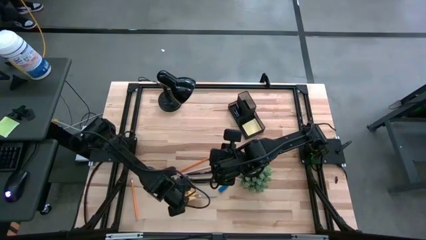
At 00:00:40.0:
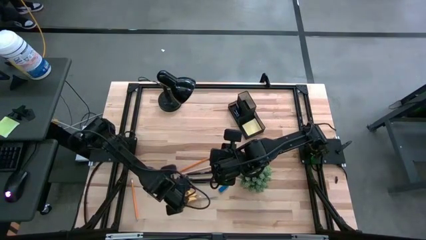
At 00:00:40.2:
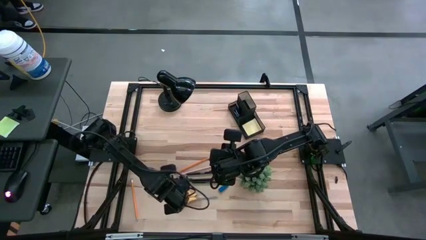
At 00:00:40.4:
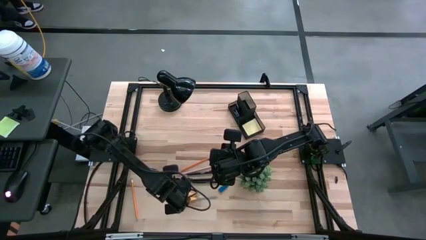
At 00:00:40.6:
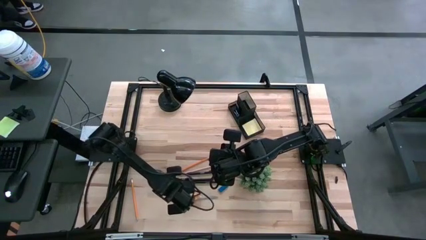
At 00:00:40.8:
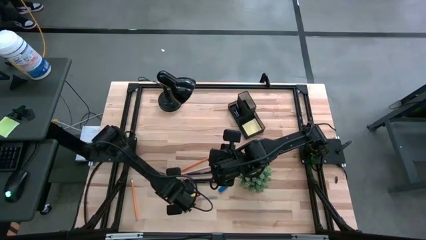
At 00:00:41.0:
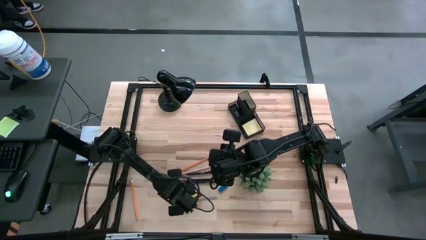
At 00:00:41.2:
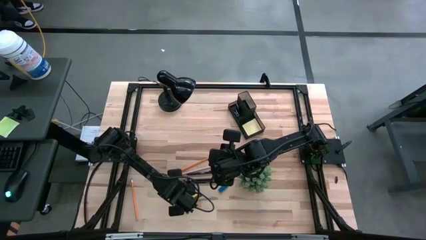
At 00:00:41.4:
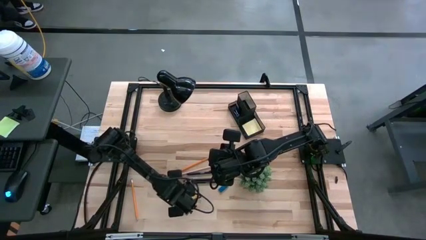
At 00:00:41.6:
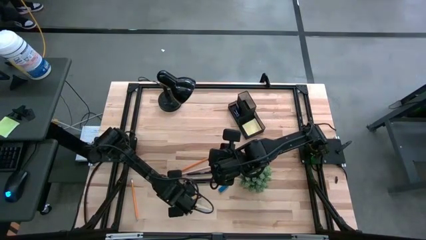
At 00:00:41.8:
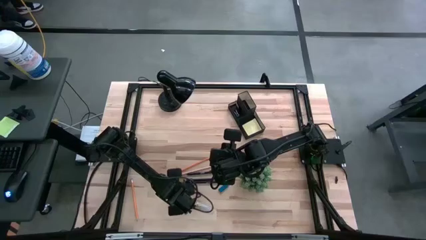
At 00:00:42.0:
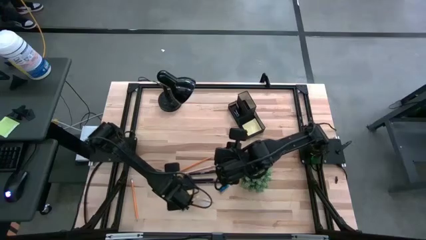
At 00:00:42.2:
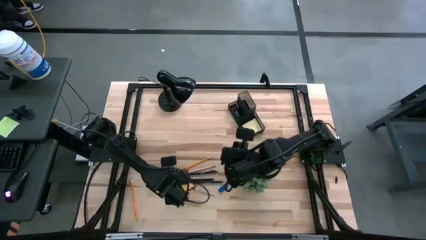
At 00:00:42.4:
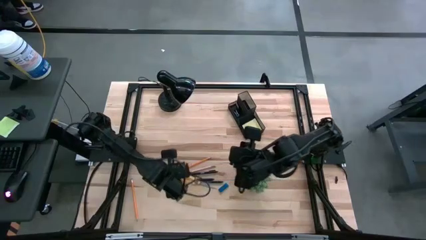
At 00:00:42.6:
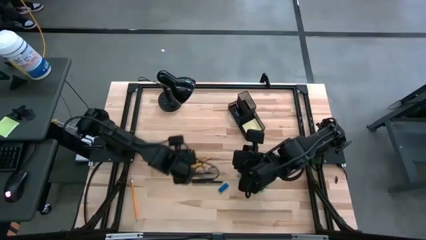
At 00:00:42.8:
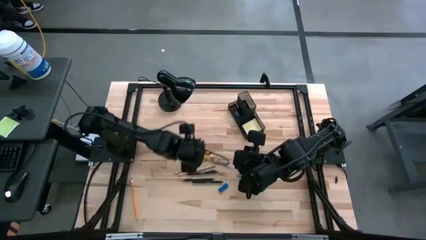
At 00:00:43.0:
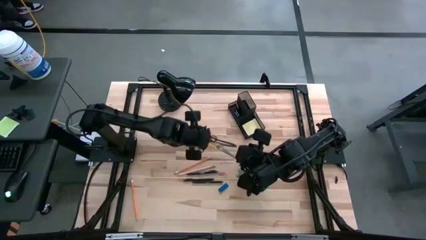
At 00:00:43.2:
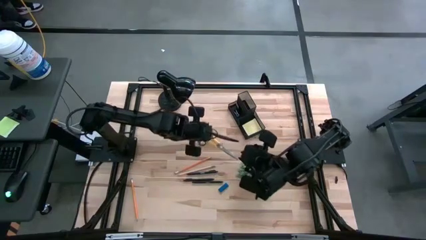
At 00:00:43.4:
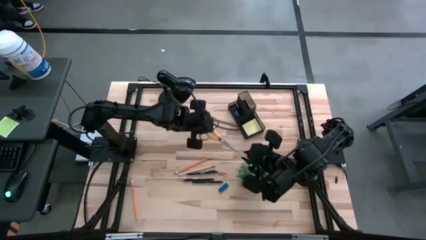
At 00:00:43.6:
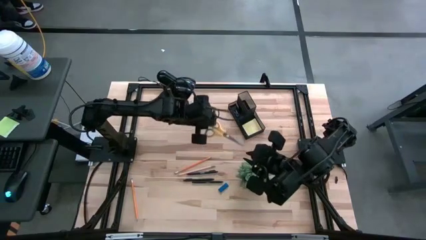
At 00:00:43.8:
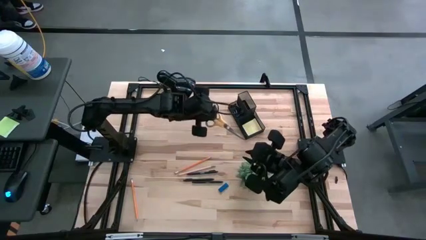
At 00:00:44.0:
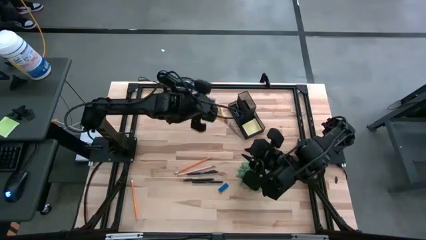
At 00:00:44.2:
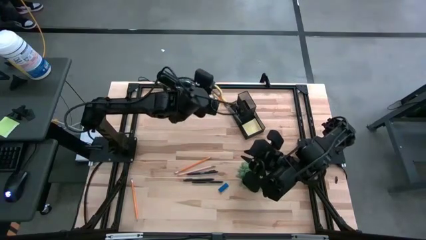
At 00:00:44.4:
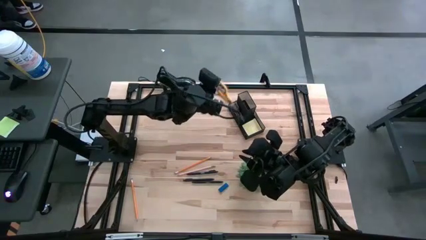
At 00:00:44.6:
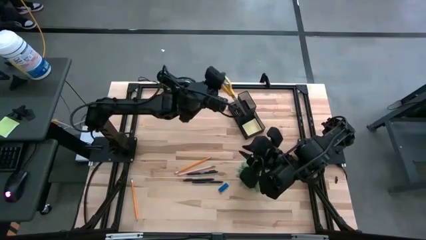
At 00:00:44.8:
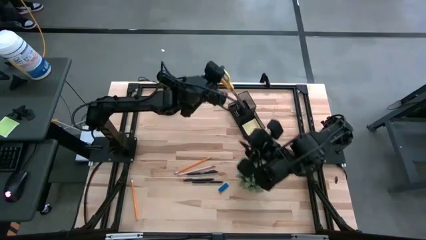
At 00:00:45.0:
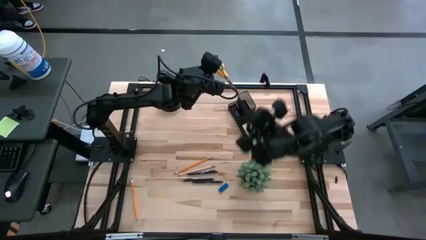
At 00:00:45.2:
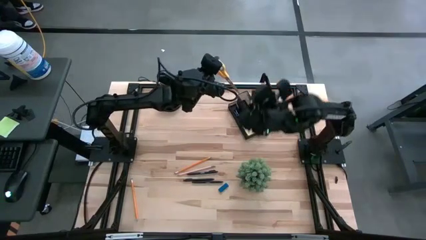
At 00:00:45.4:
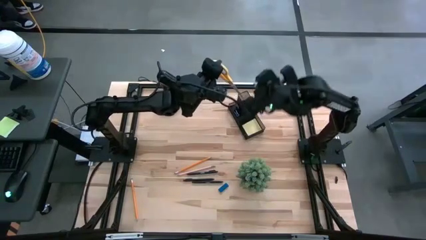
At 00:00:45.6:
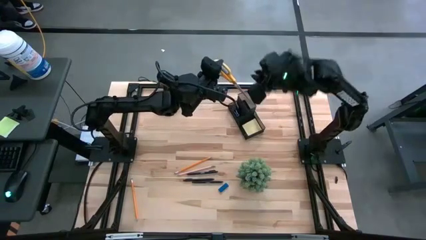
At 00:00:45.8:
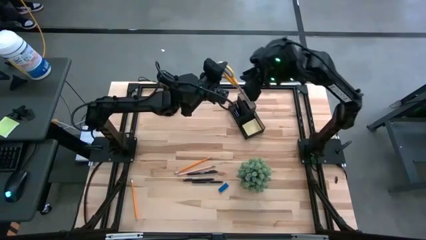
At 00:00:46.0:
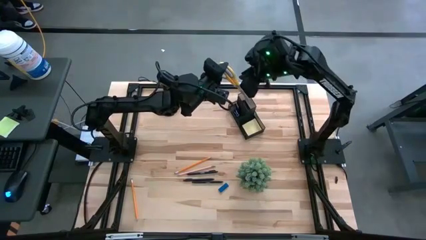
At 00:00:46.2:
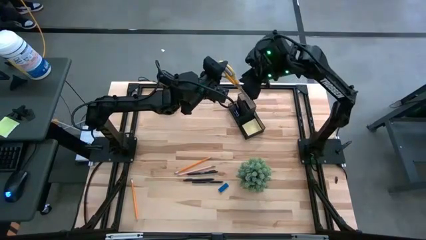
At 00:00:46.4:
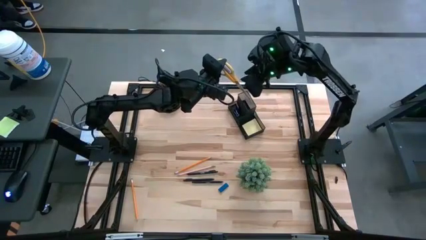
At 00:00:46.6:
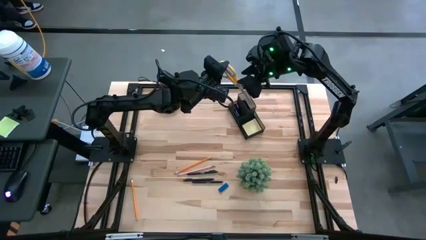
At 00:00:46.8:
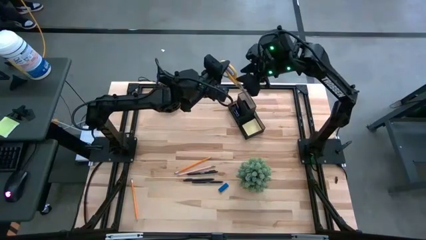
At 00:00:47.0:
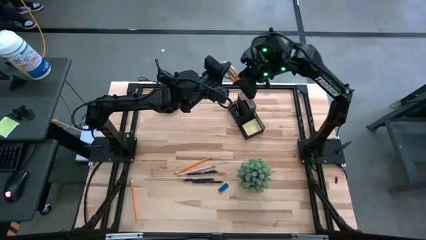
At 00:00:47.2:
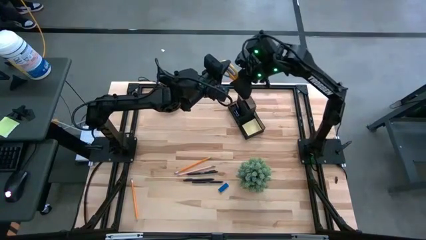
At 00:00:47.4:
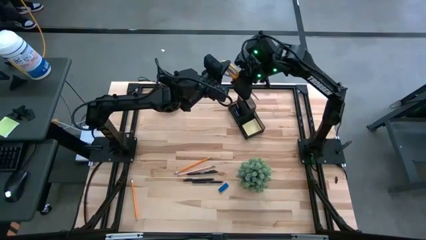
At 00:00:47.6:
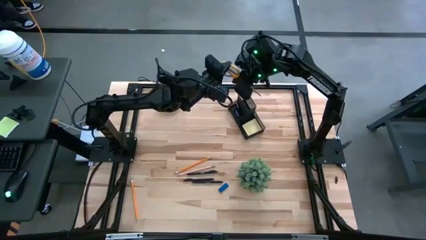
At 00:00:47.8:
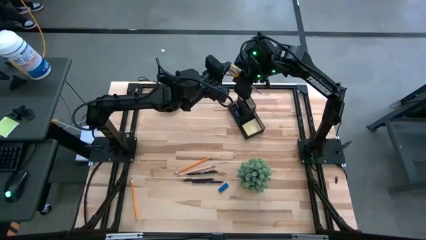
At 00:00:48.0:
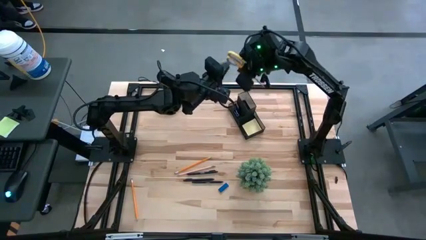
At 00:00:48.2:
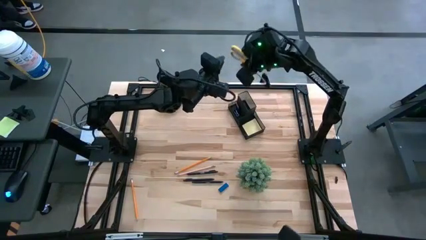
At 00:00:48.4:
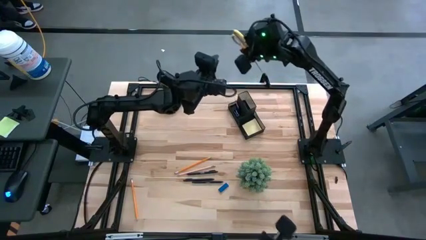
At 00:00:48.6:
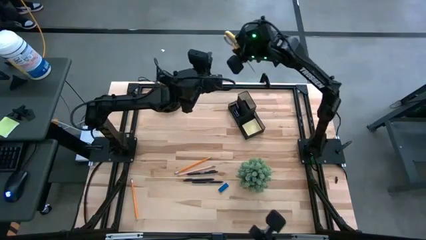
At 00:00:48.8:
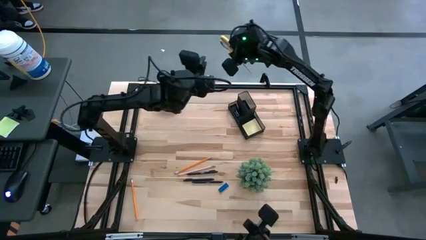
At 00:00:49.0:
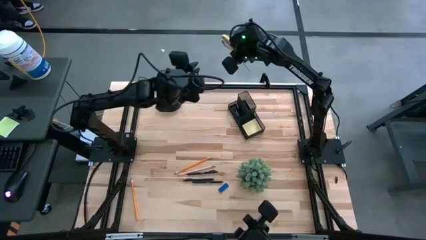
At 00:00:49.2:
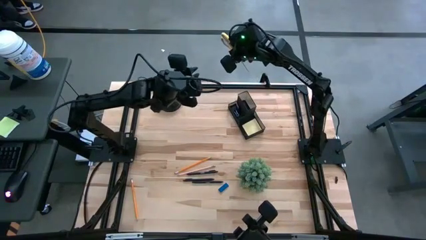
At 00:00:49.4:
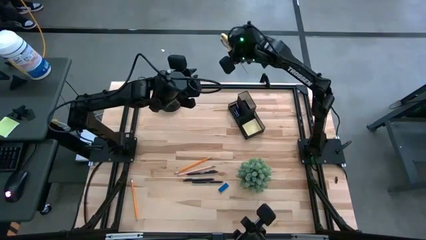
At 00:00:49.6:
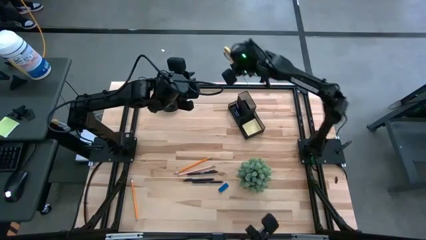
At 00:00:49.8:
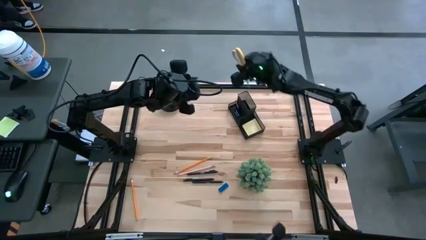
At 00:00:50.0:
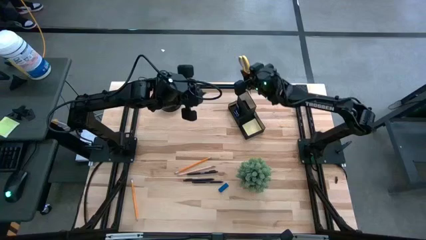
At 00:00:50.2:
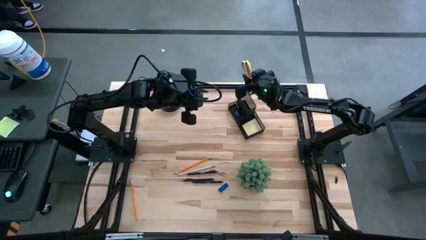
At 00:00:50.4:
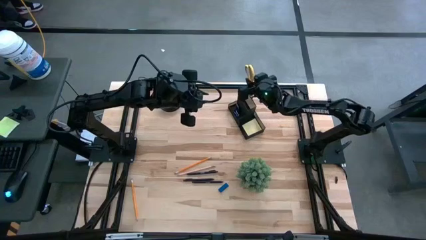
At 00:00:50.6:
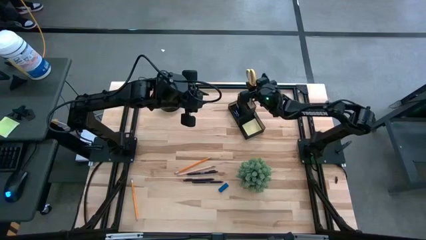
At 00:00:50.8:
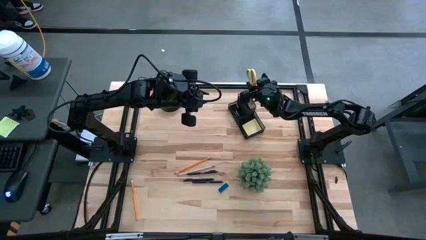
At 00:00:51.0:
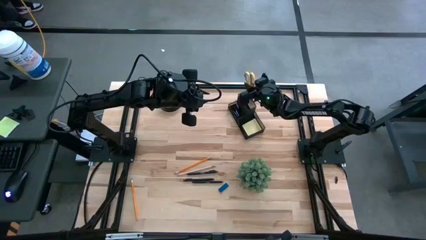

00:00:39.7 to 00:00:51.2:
Task: Pick and place office supplies into organizer
Put the yellow scissors into the desk organizer

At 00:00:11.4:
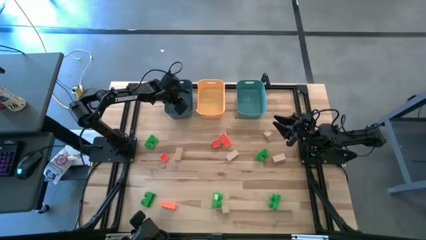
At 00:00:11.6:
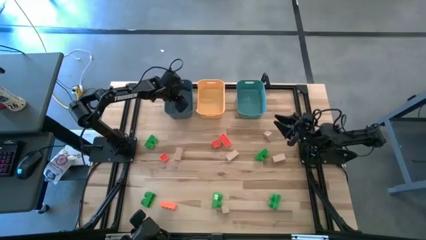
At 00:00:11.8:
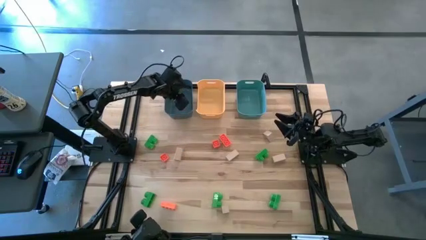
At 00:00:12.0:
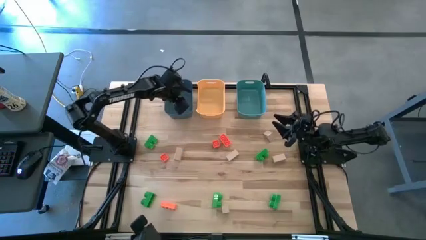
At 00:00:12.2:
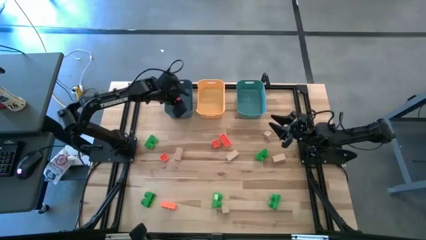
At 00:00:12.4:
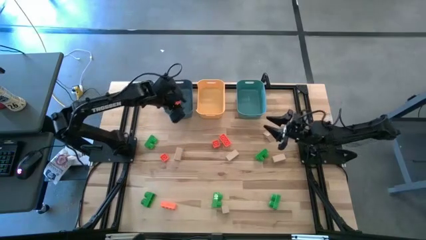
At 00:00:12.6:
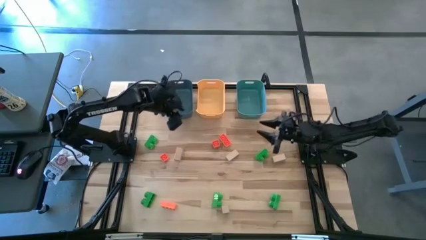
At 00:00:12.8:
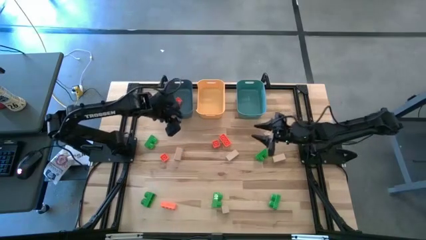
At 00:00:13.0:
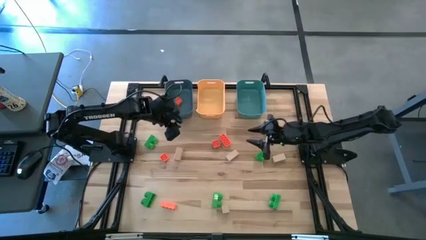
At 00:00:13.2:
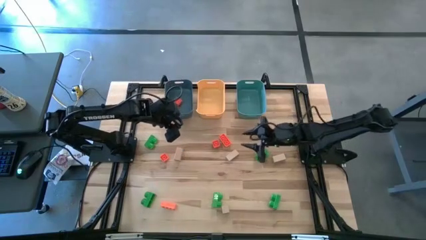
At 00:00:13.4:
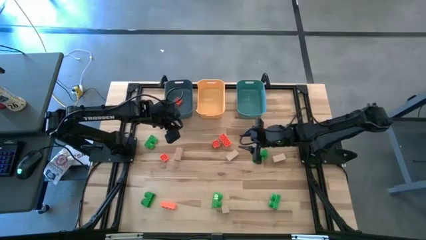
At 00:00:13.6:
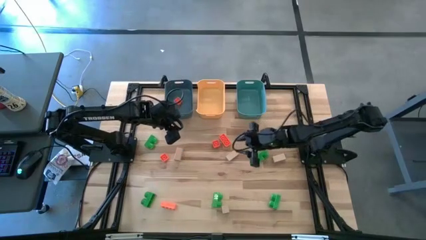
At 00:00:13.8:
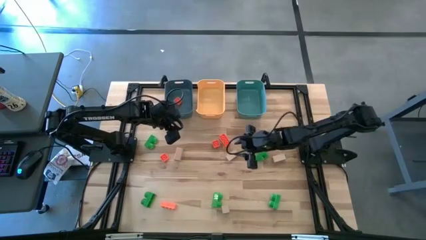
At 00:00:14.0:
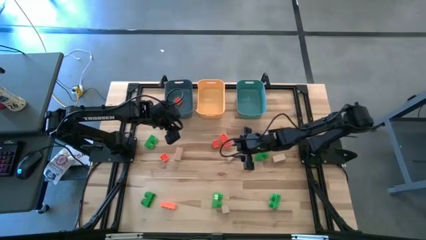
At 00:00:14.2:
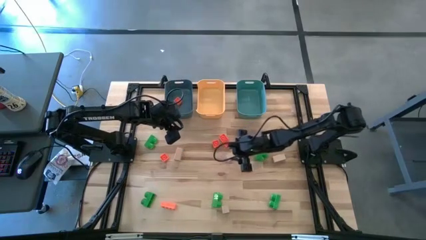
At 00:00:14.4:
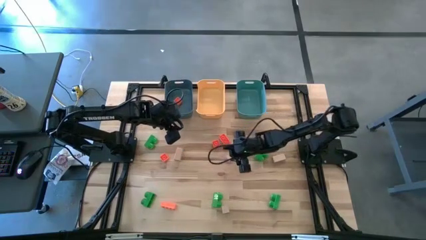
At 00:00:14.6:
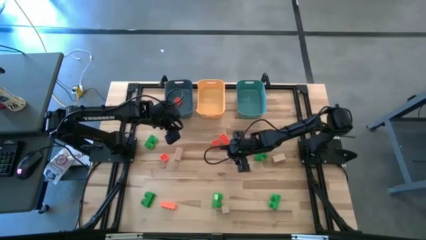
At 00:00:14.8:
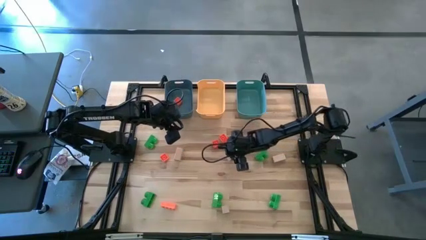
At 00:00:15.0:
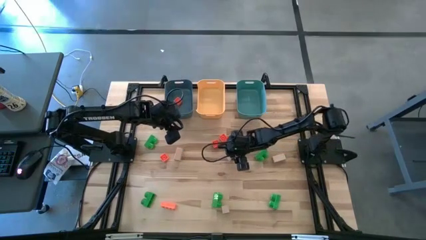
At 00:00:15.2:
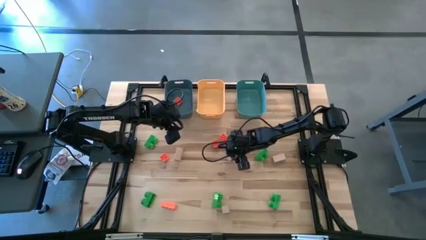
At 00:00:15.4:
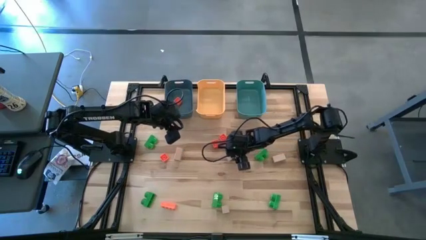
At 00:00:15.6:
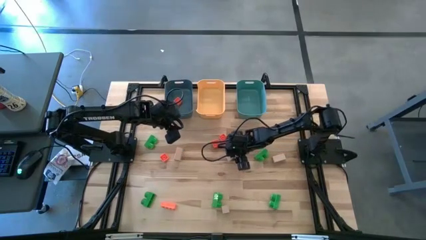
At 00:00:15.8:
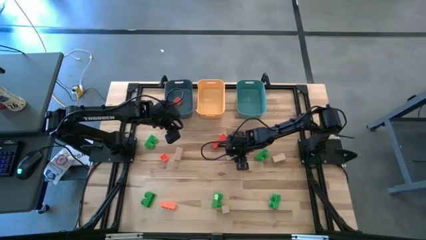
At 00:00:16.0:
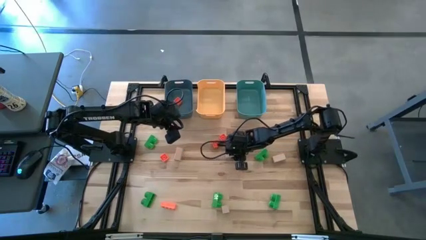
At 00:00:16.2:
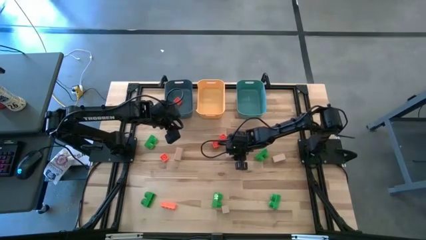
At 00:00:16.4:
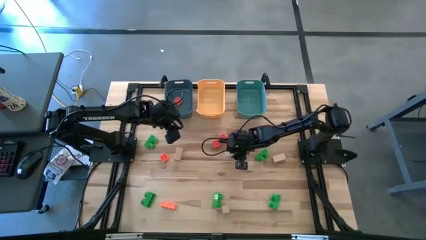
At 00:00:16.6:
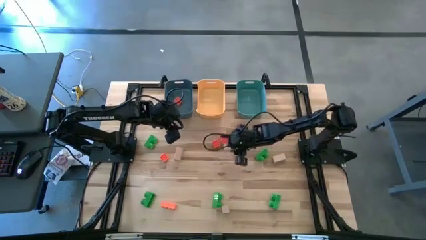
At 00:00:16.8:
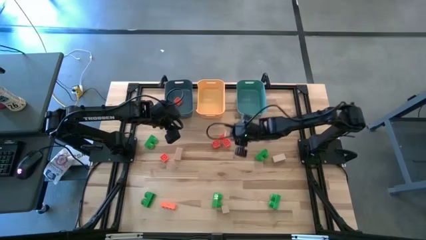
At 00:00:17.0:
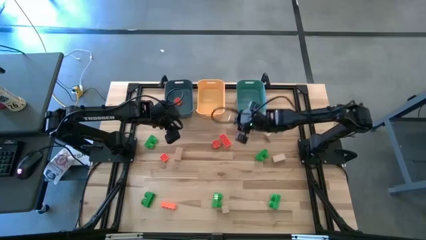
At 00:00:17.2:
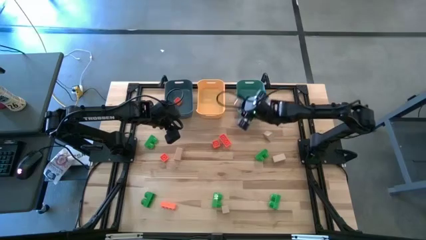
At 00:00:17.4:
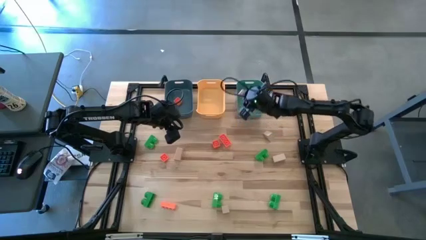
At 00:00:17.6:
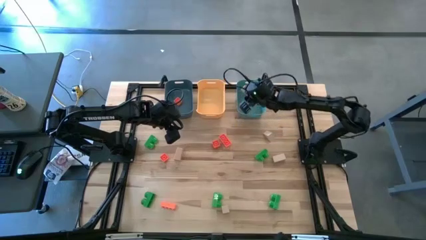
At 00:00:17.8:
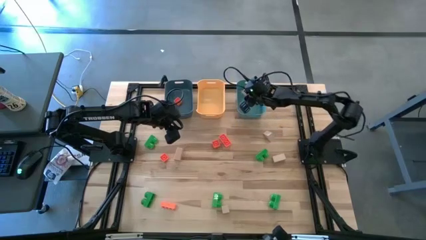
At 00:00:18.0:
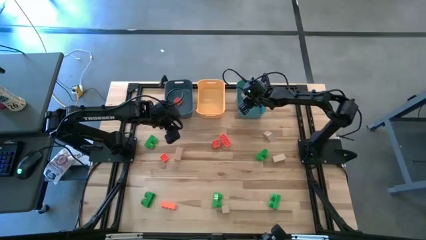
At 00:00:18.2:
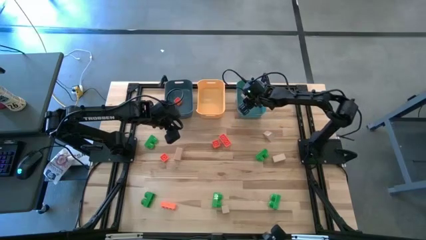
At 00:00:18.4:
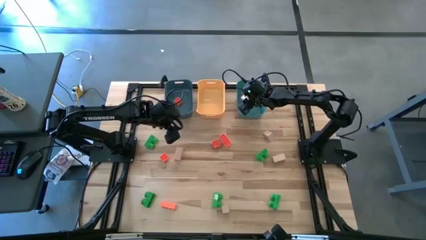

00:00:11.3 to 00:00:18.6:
Task: Sort & place blocks by color
Put the brown block into the green bin
